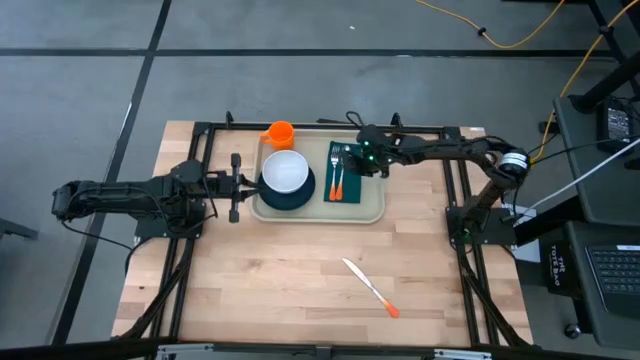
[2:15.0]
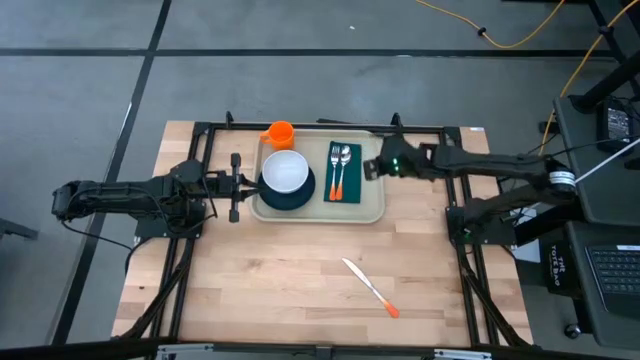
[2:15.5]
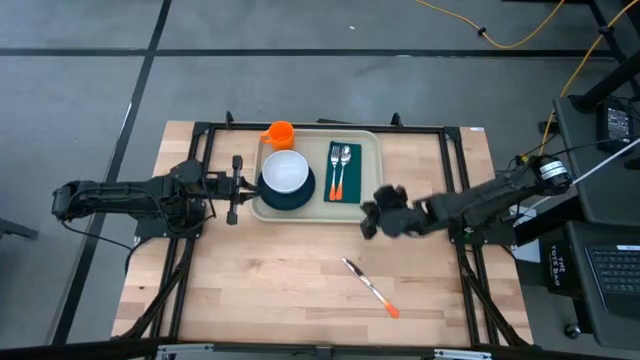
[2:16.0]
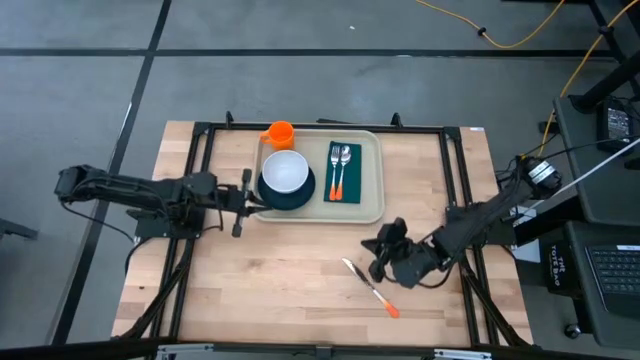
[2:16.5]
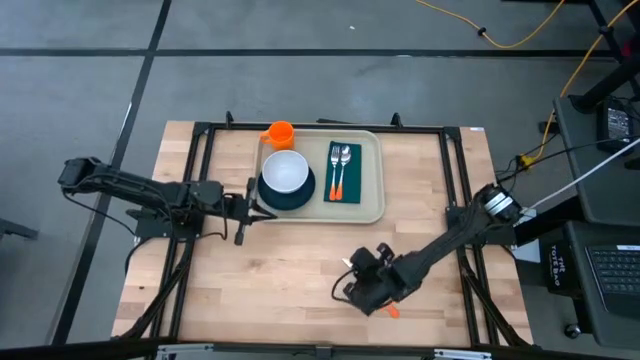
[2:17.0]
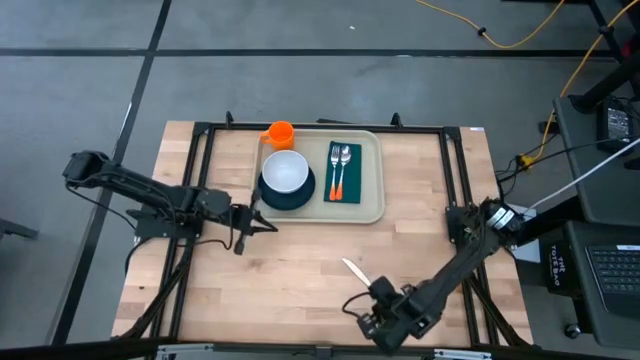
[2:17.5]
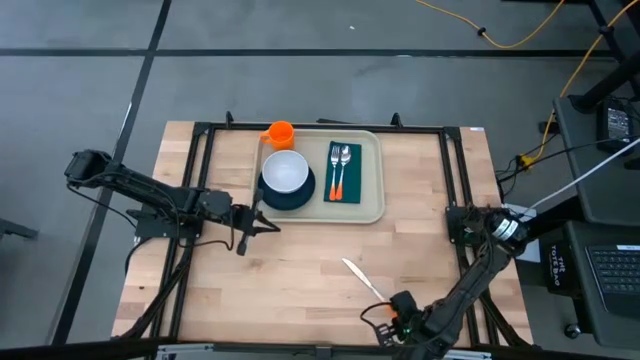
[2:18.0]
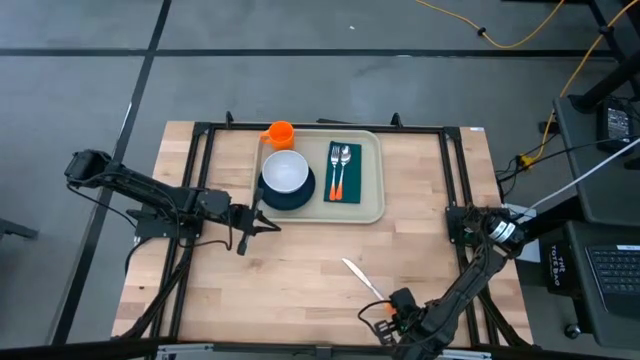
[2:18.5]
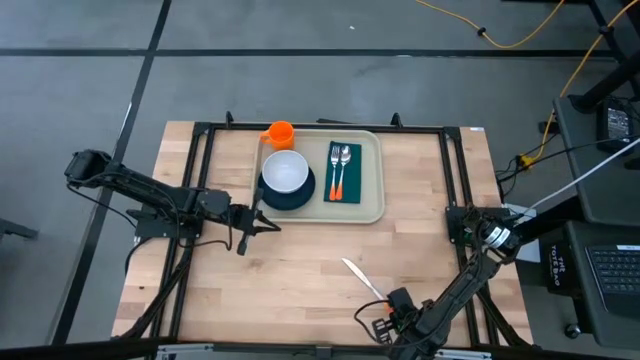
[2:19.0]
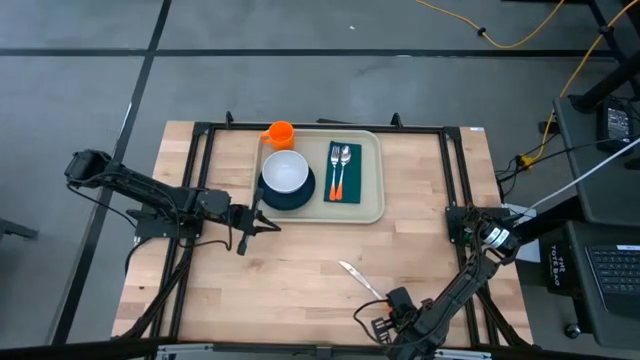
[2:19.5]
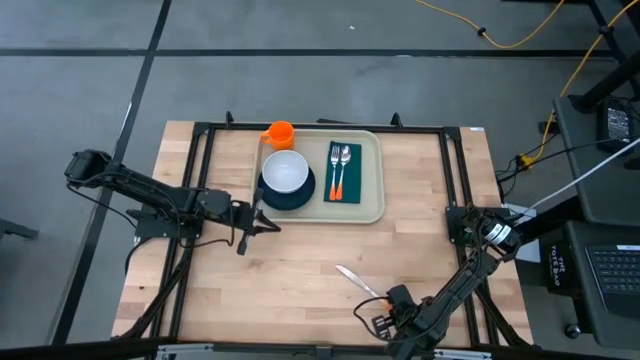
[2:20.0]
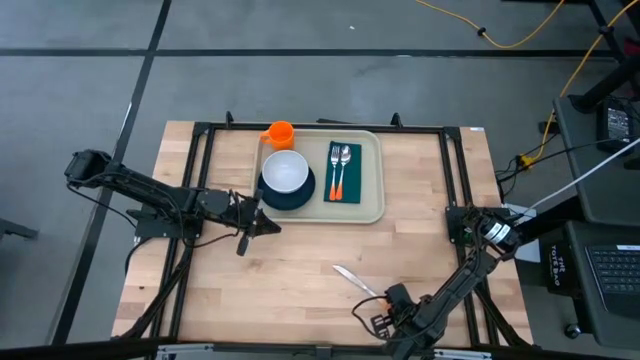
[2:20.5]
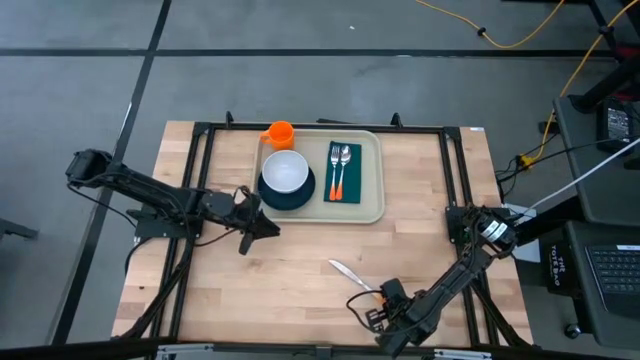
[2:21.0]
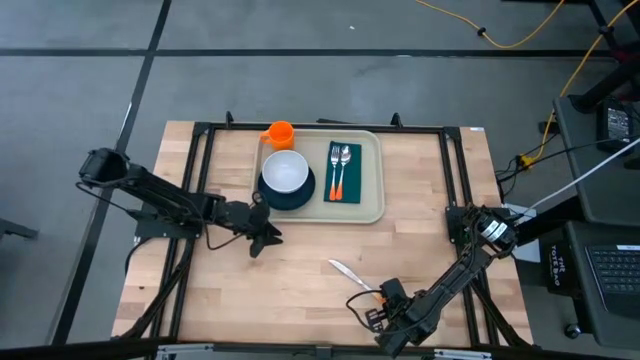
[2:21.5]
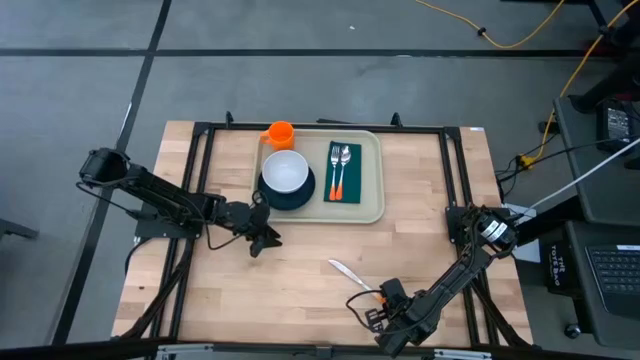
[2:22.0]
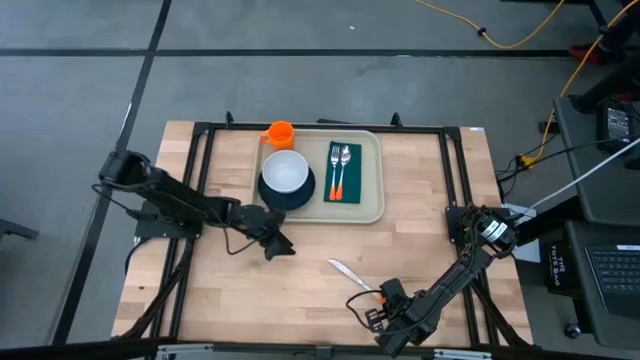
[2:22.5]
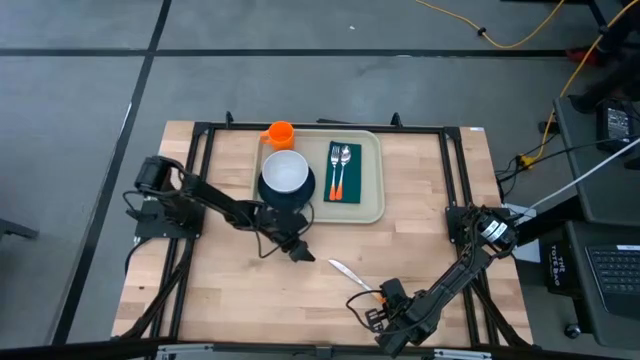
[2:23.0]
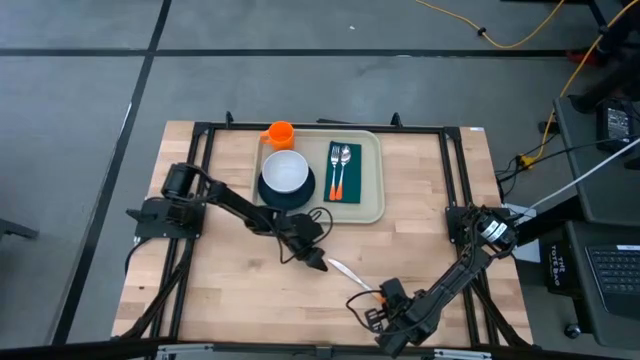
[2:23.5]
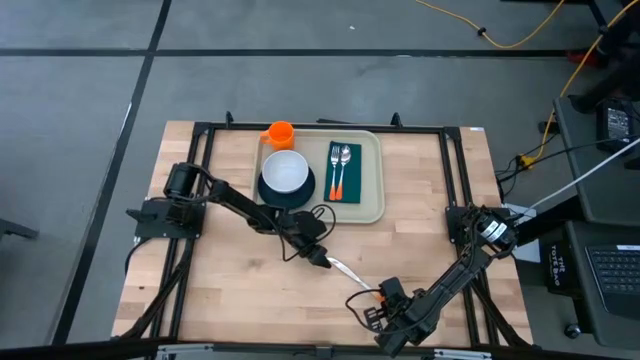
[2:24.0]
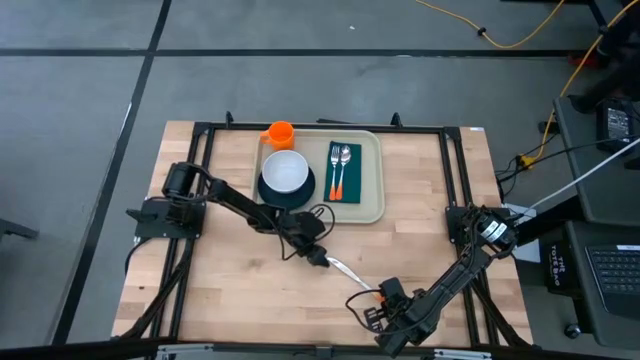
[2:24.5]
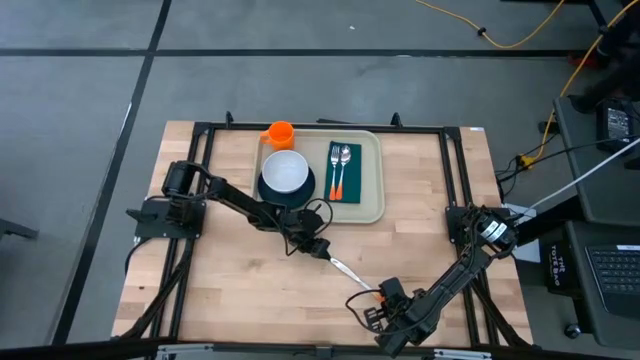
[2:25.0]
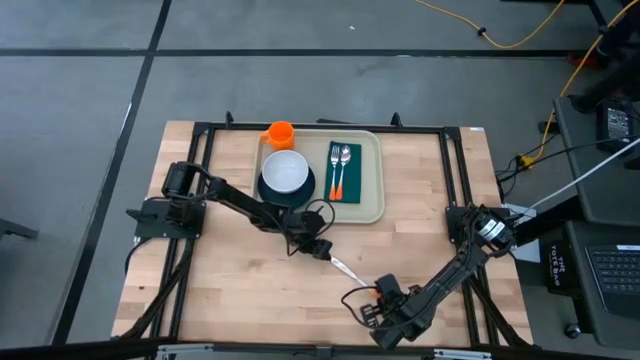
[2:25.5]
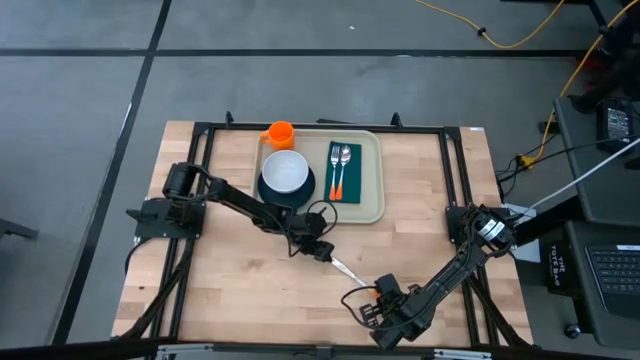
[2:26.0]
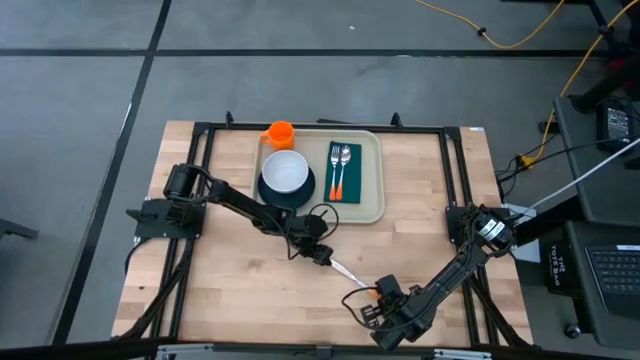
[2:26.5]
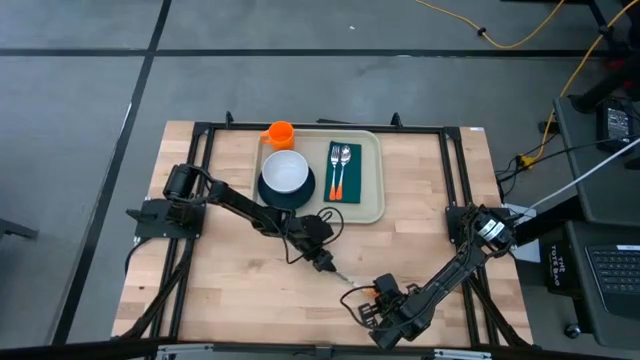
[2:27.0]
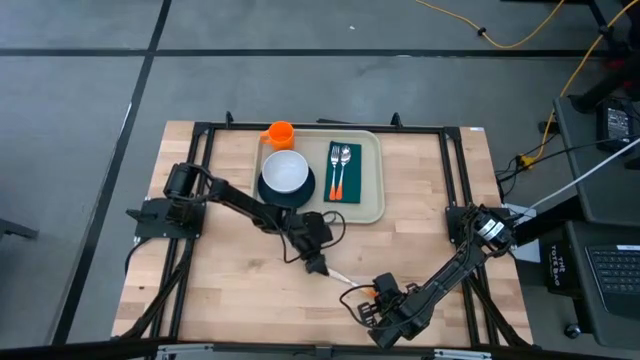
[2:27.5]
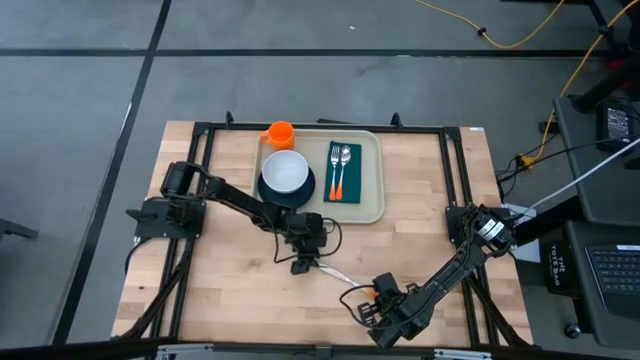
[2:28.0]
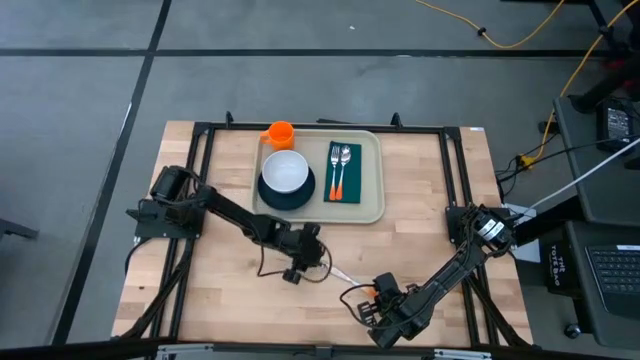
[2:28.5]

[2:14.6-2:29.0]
Task: Set up tray
Put the orange table knife on top of the green table napkin on the brown serving tray to the right of the orange spoon

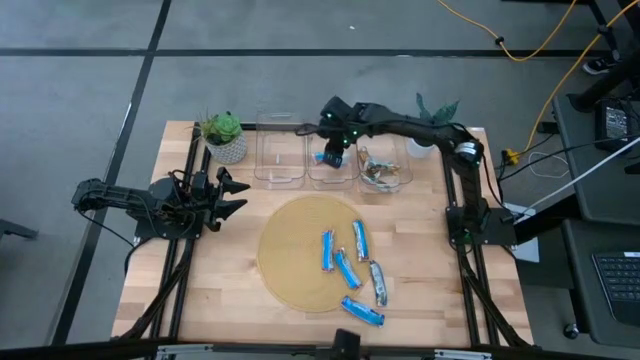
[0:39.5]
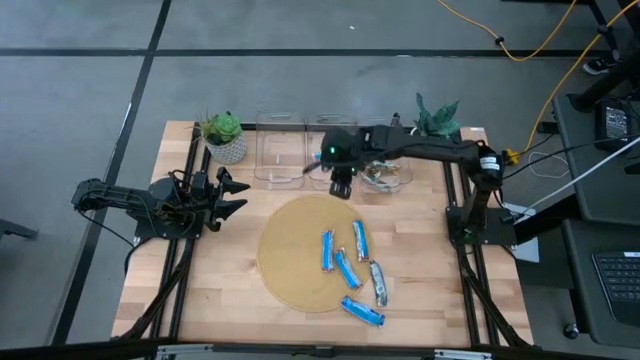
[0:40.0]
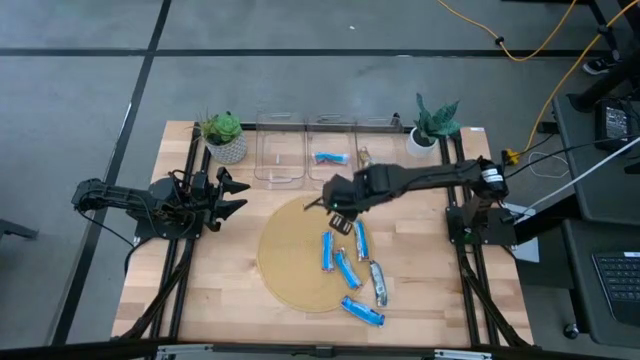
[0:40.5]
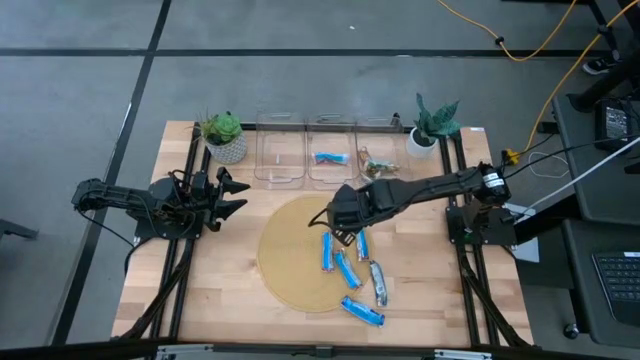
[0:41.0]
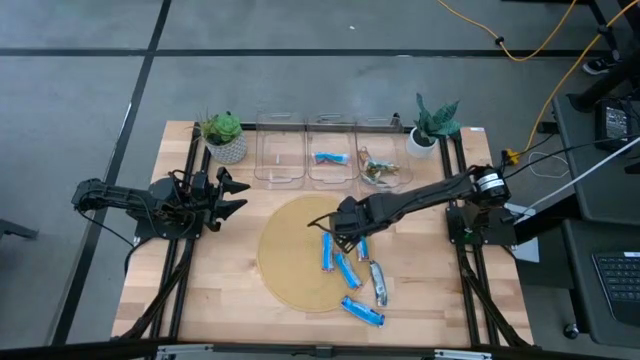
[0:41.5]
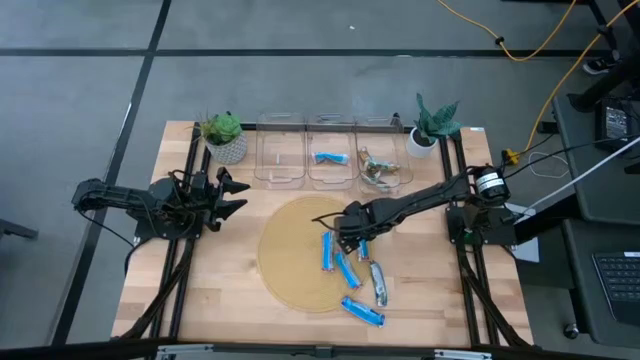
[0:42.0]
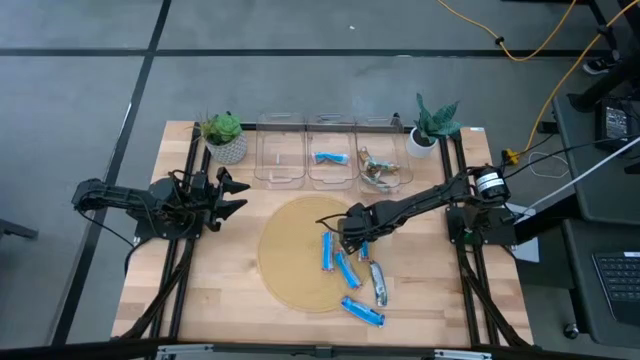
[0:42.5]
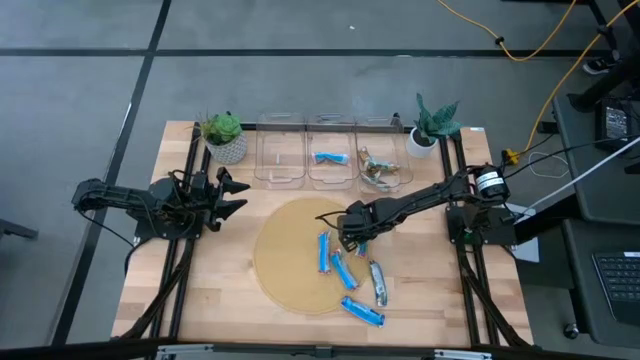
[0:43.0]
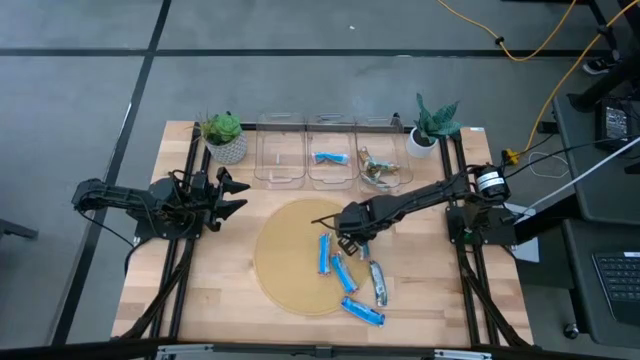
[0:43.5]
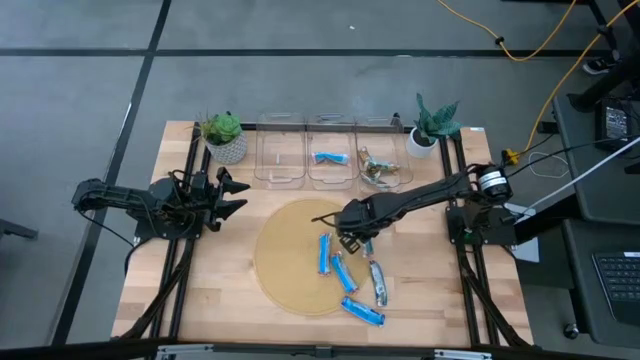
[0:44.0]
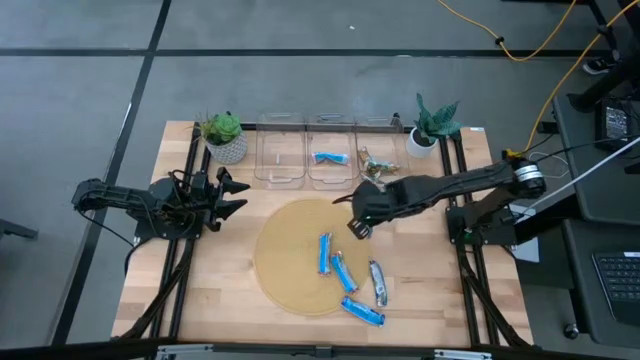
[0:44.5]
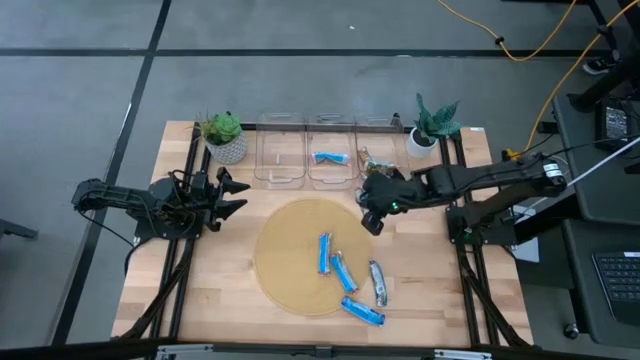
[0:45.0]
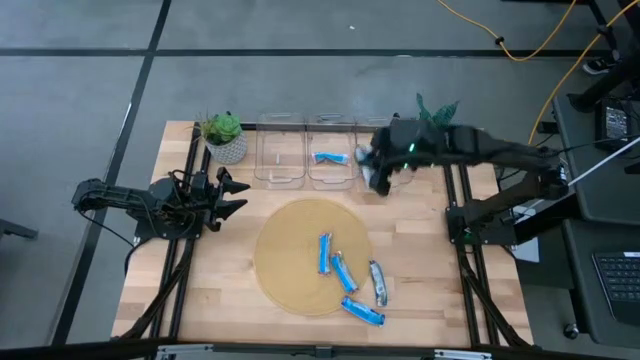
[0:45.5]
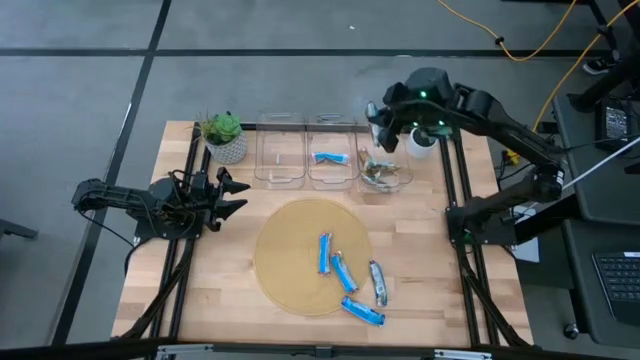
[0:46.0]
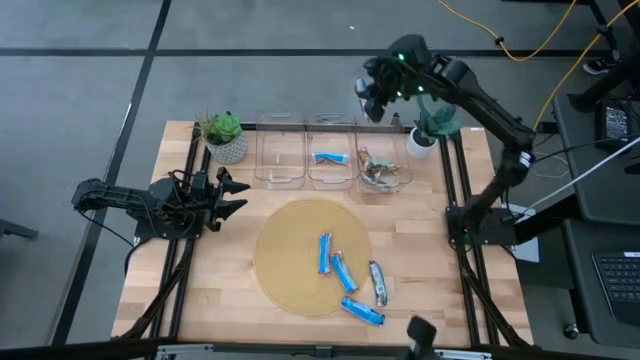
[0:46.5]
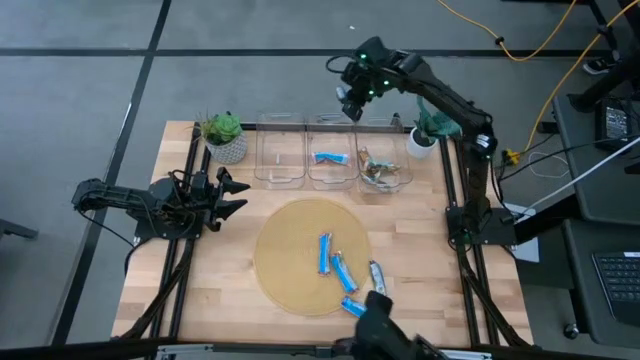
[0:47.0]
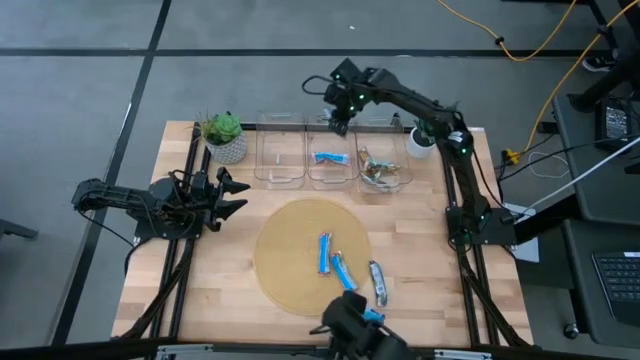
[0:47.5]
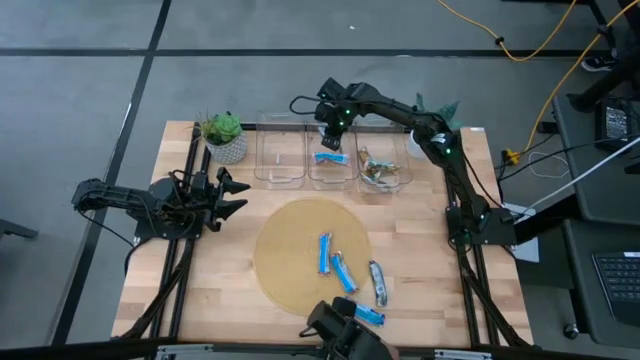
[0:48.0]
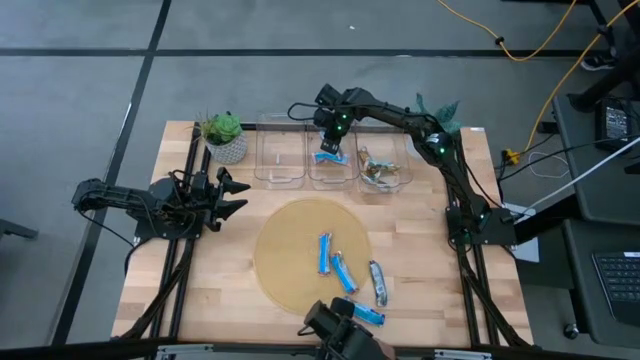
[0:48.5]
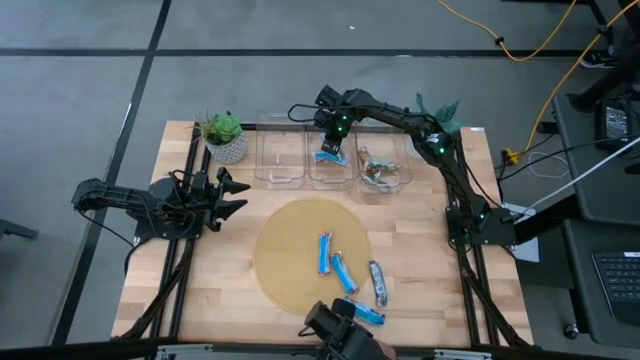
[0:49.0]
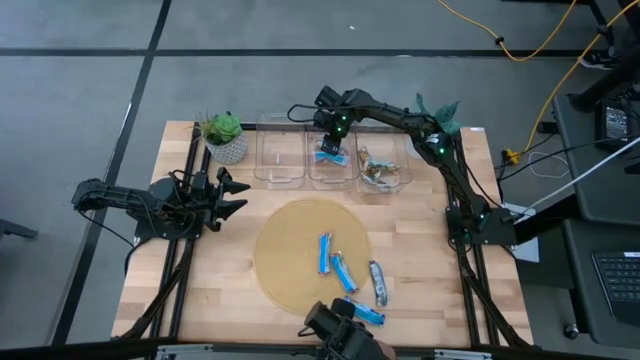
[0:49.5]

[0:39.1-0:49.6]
Task: Pick and place Granola Bars by type
Put the red granola bar into the middle transparent bin
